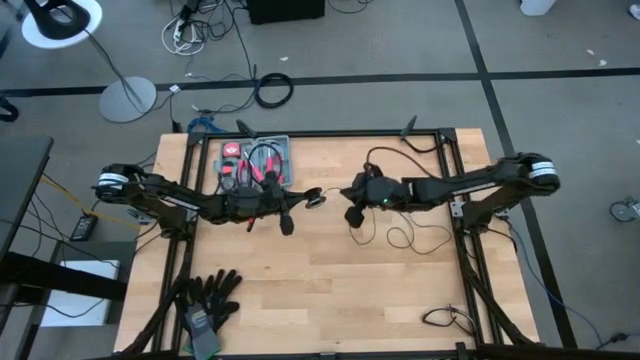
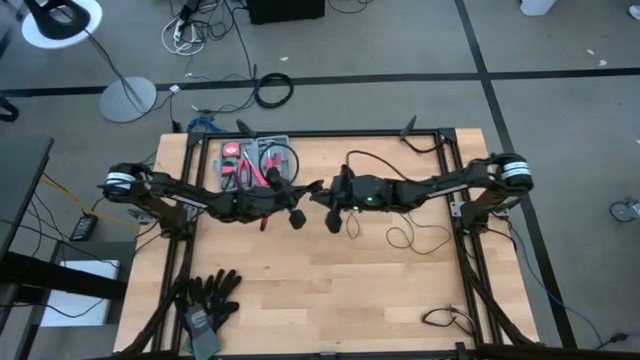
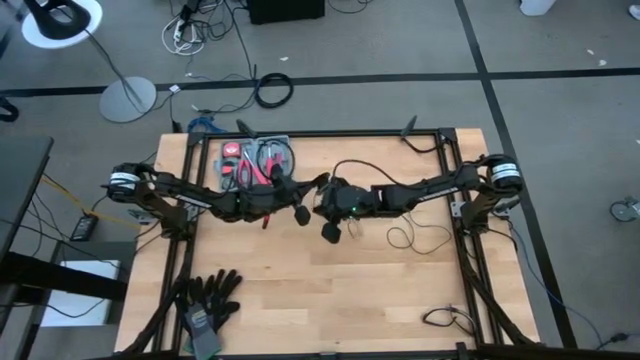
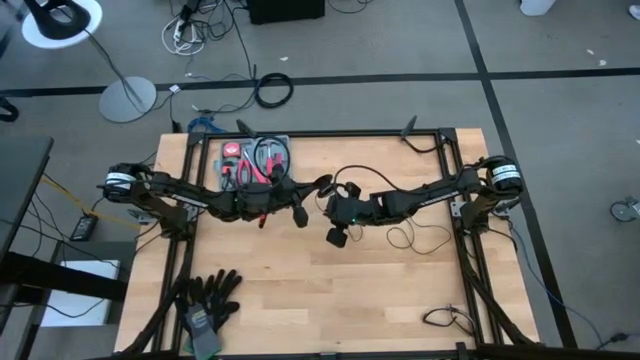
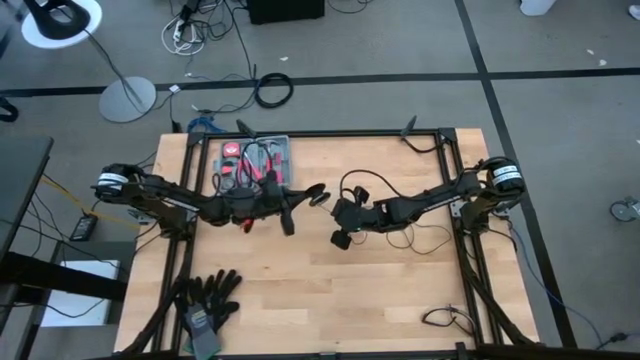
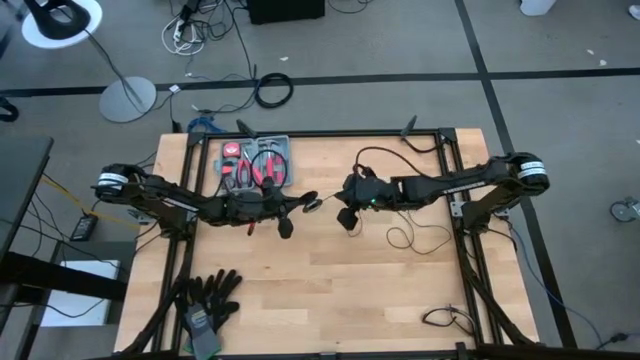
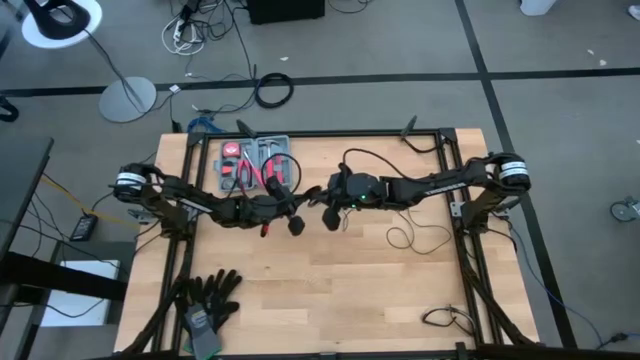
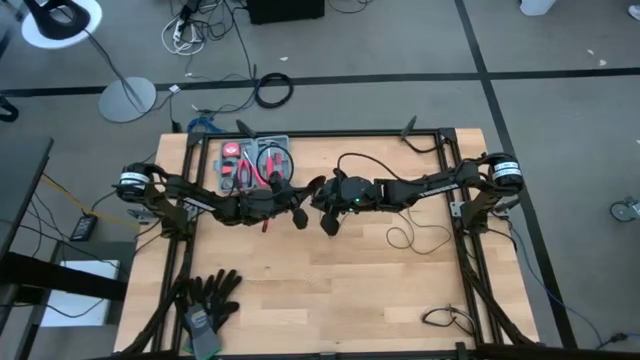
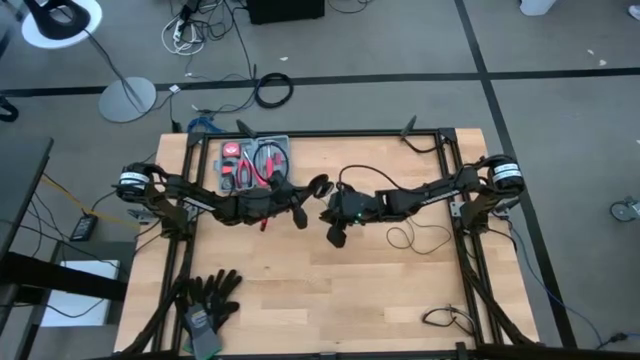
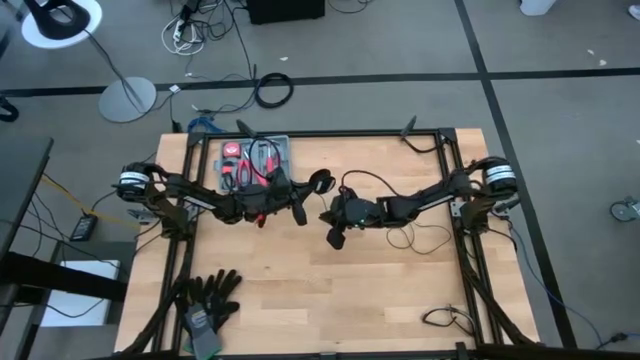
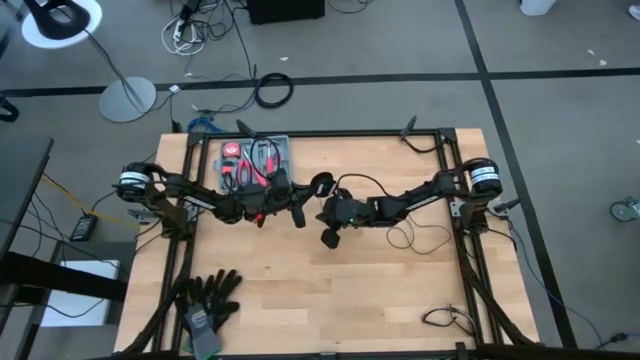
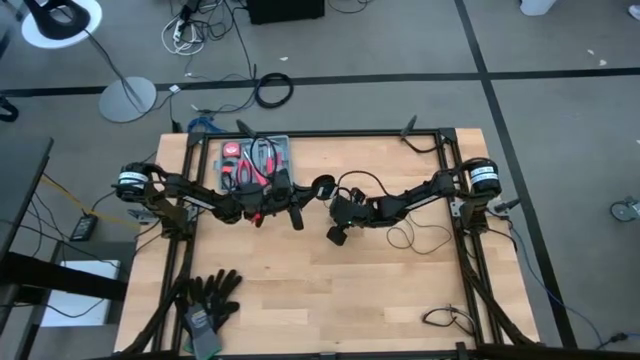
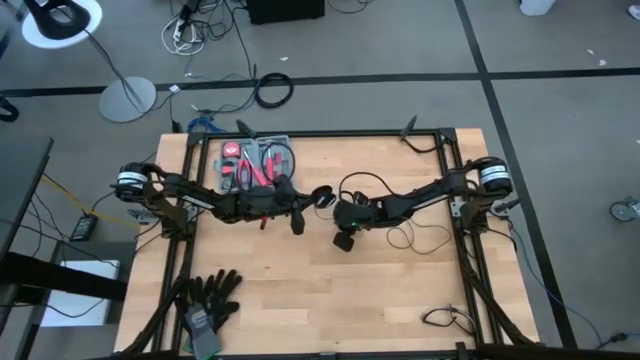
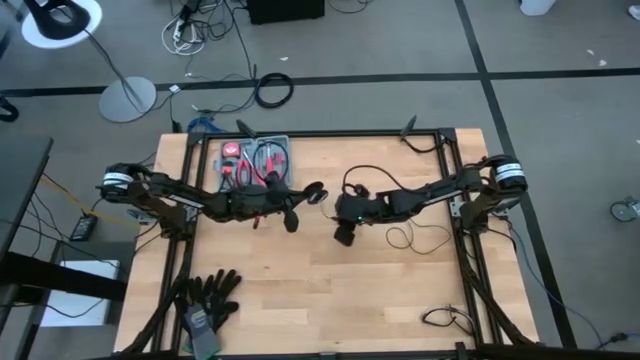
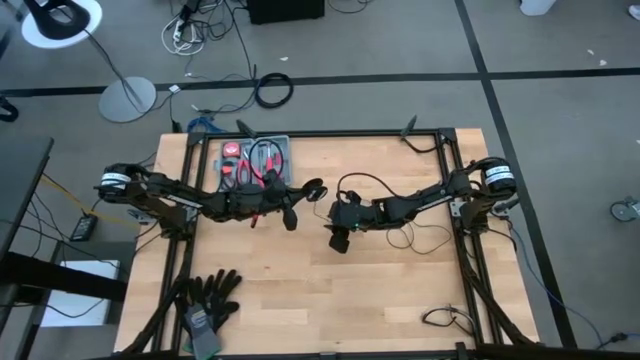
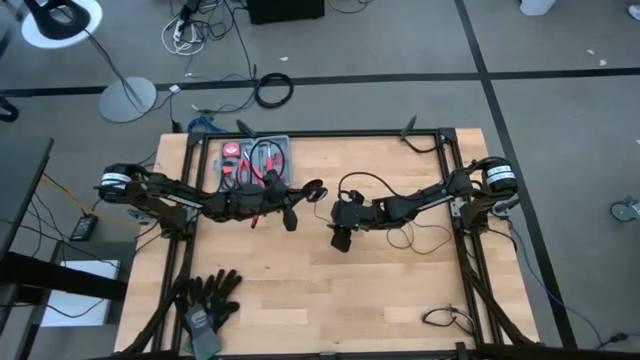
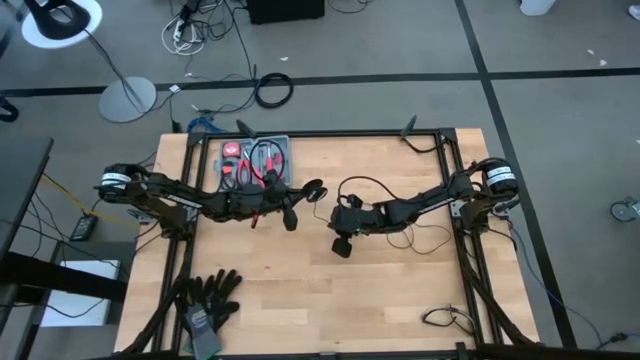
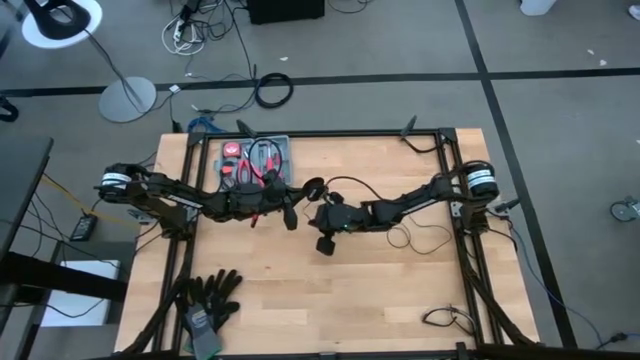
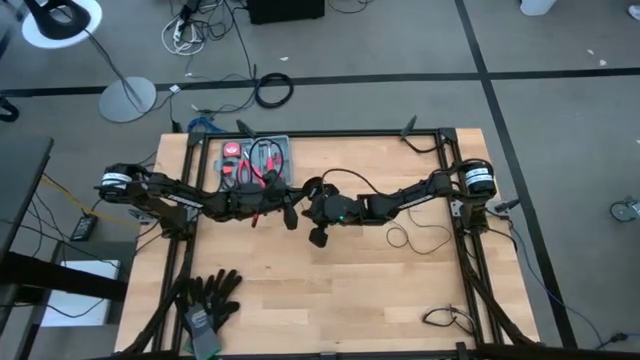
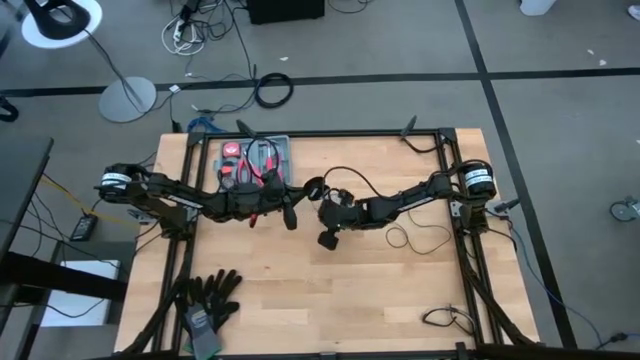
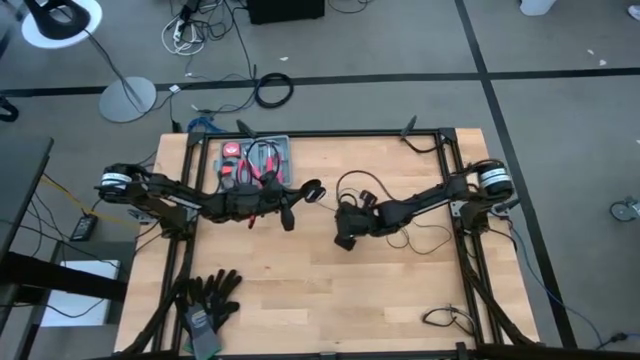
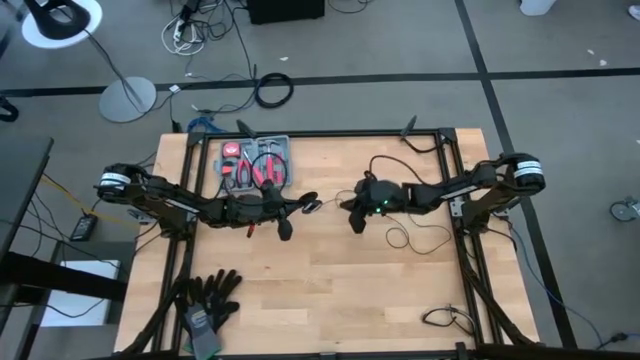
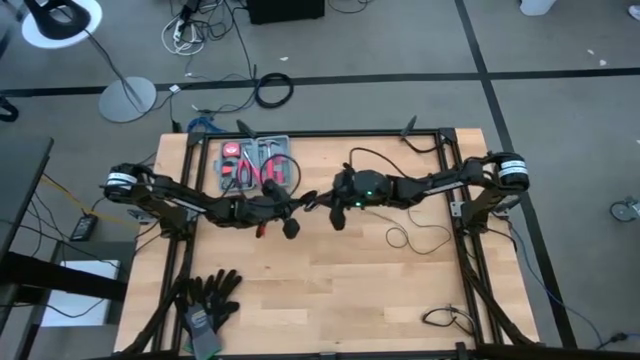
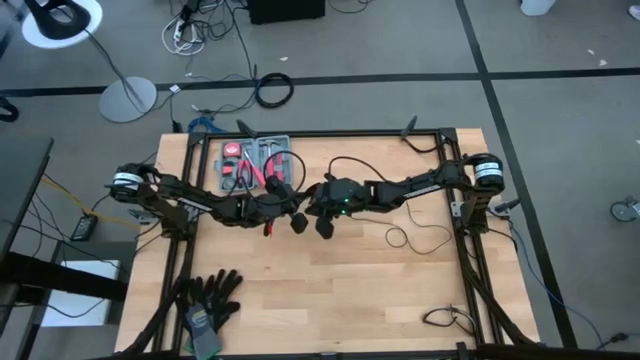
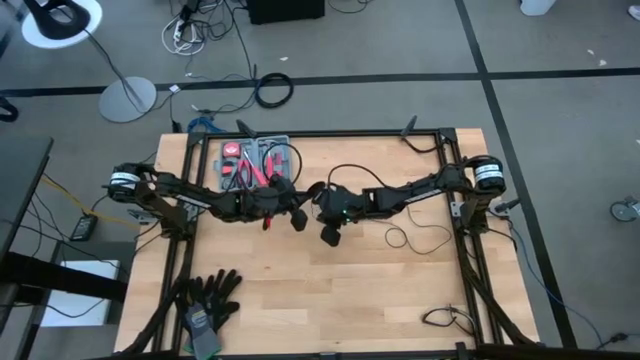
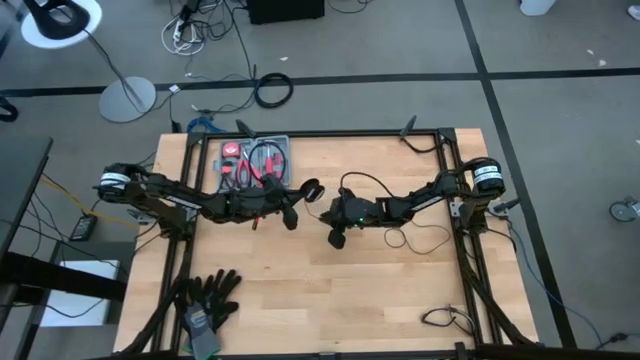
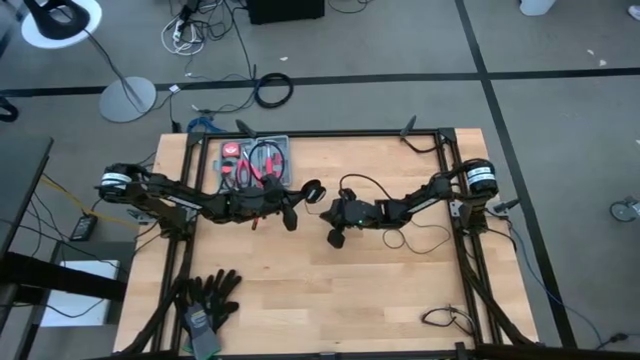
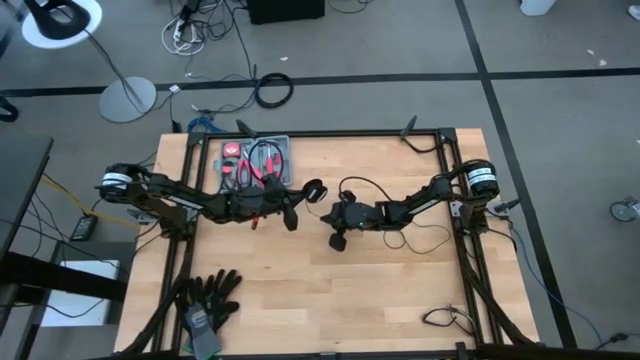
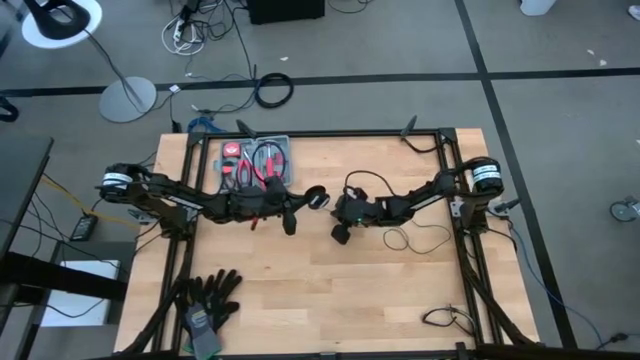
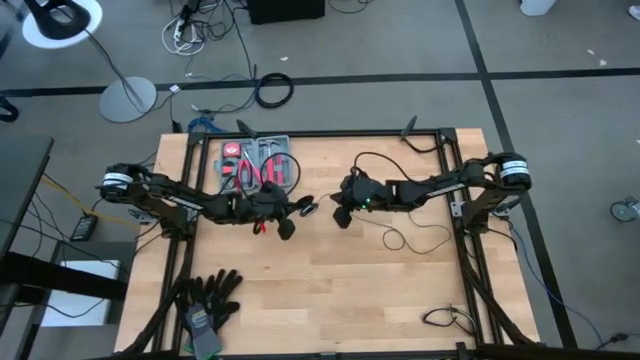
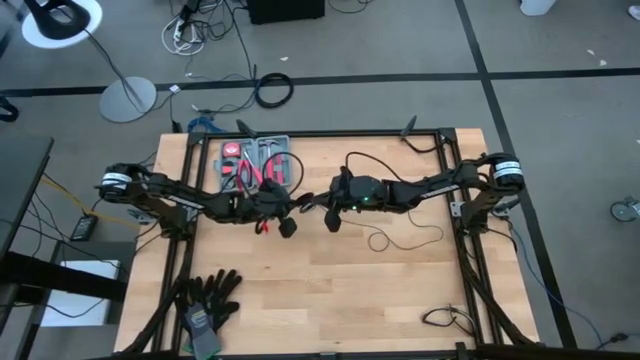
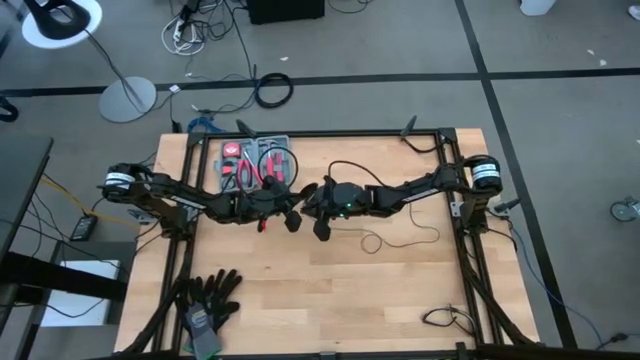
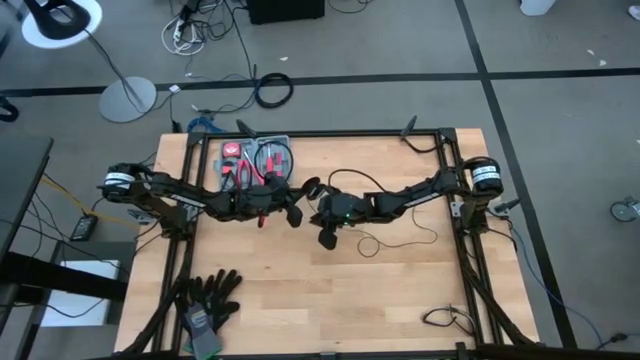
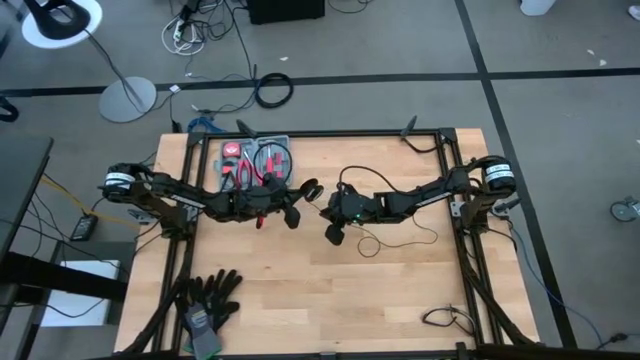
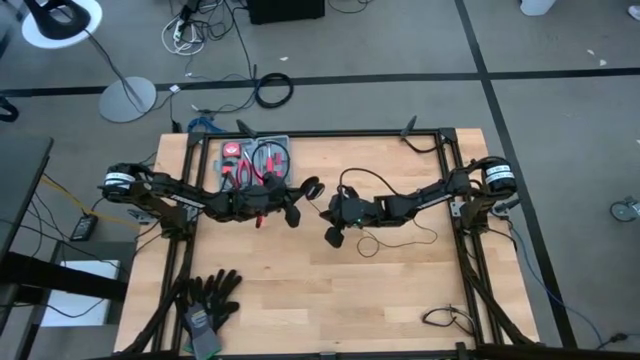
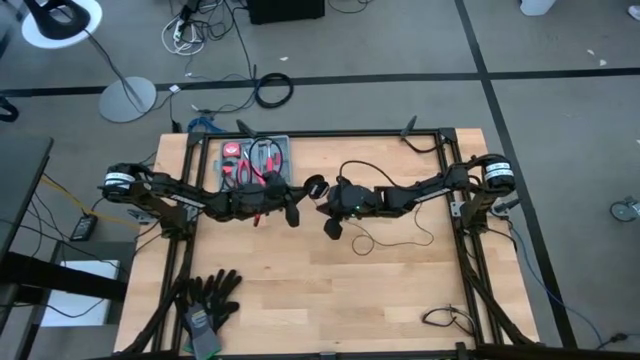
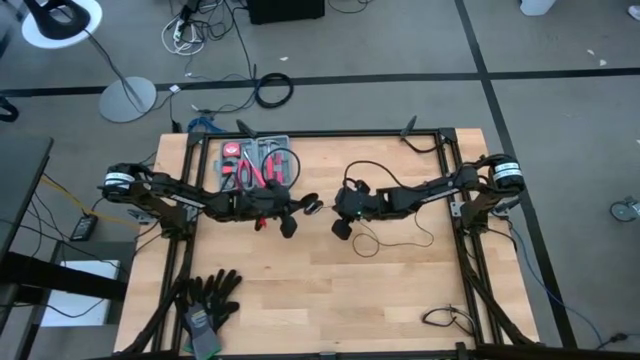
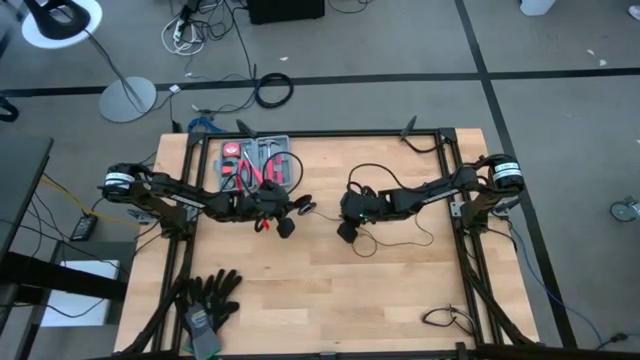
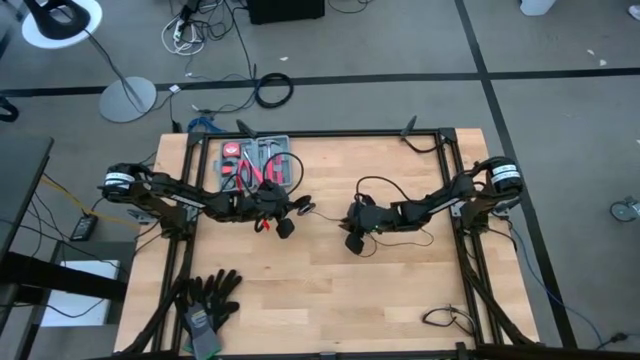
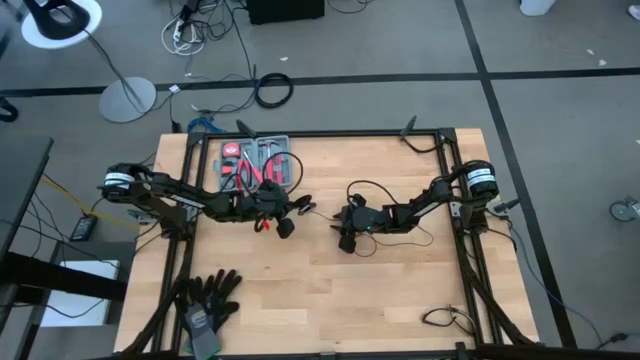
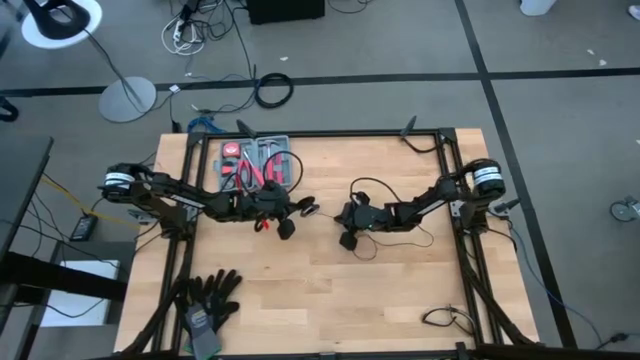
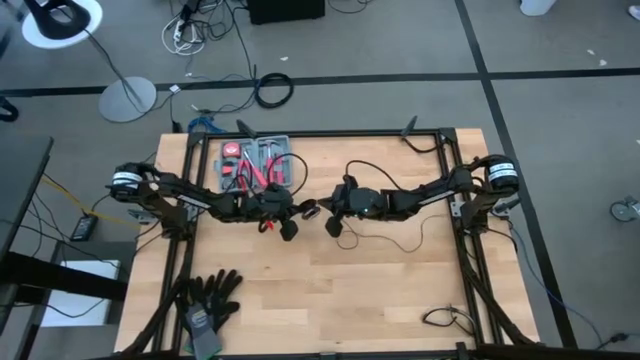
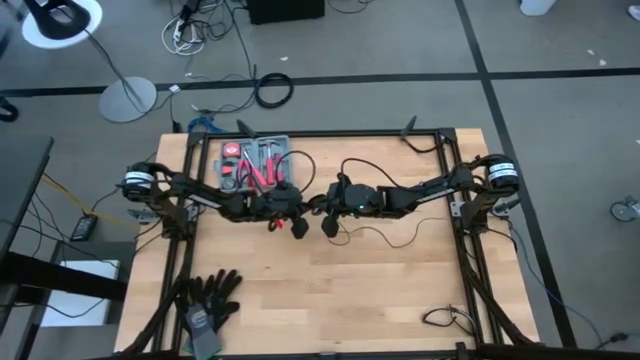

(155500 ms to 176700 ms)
Task: Coil cords
Coil the black cable wire on the spool
